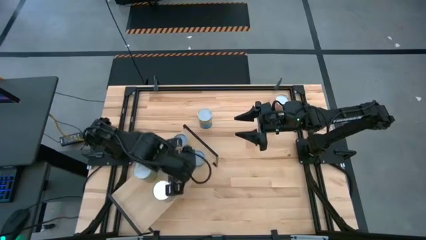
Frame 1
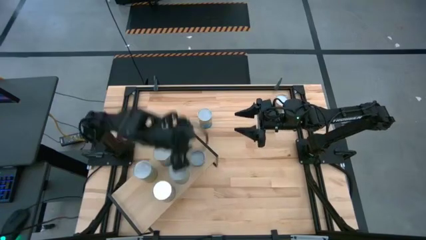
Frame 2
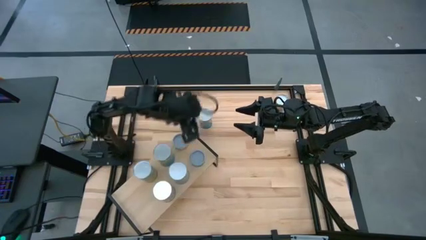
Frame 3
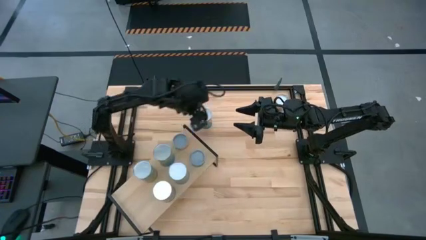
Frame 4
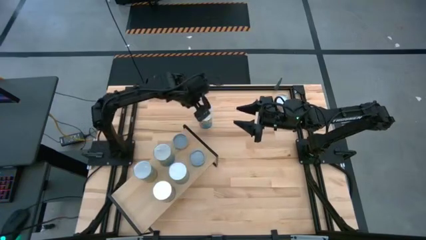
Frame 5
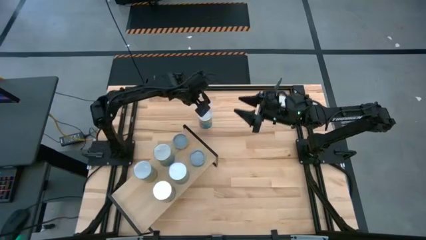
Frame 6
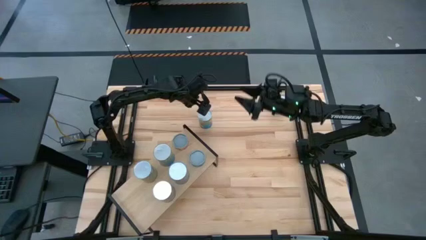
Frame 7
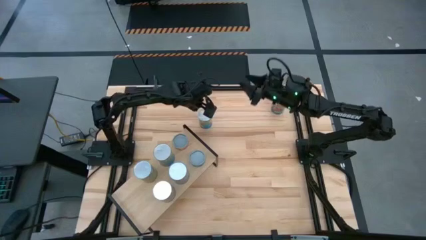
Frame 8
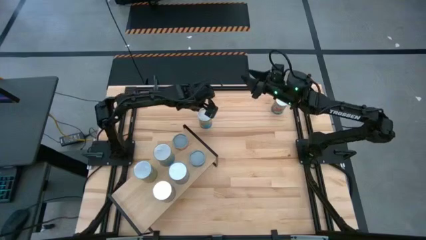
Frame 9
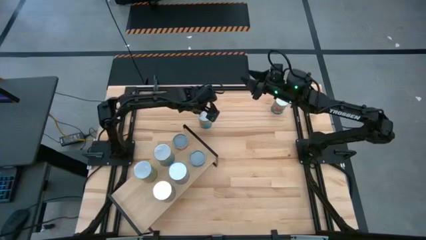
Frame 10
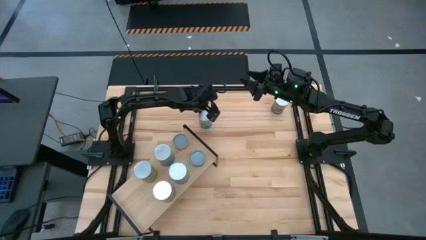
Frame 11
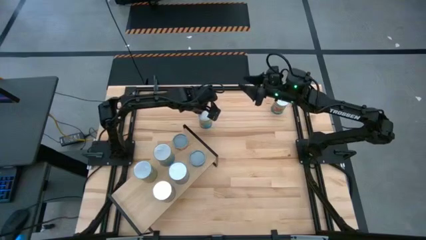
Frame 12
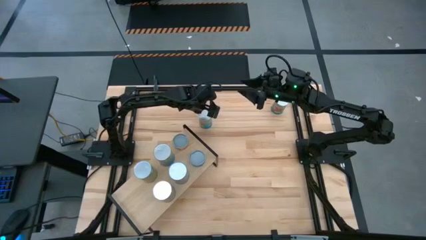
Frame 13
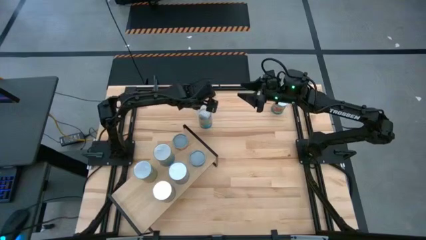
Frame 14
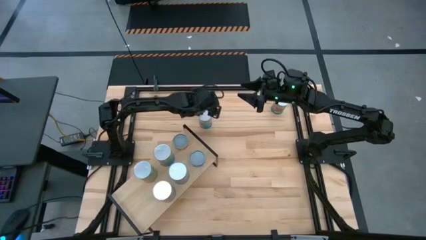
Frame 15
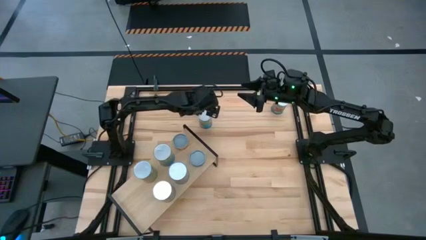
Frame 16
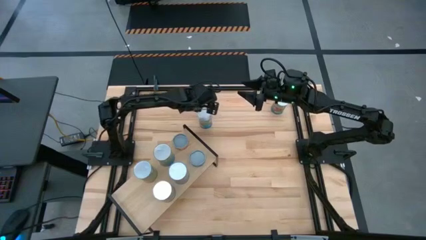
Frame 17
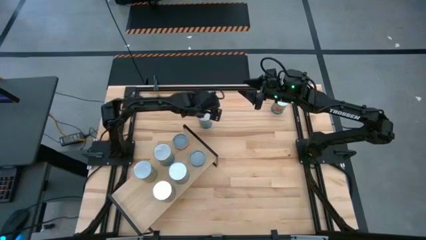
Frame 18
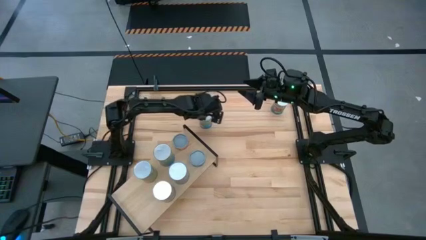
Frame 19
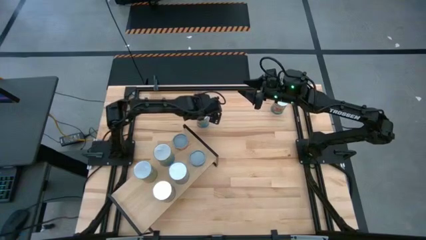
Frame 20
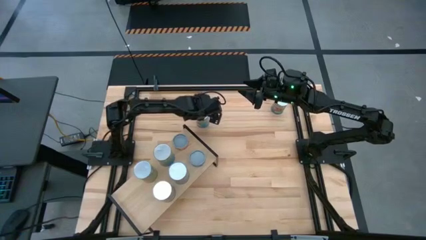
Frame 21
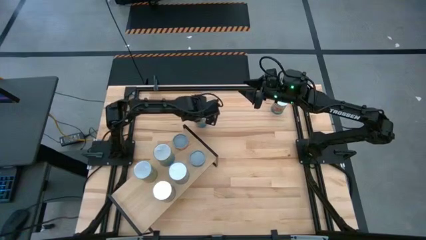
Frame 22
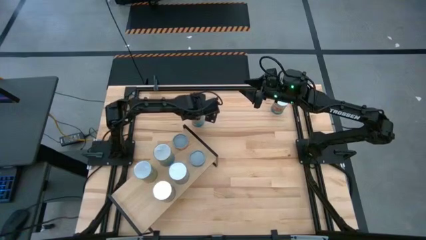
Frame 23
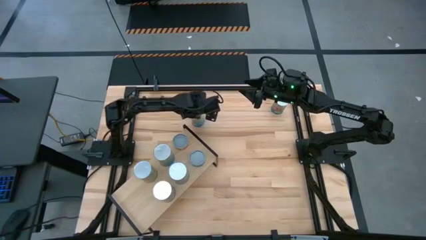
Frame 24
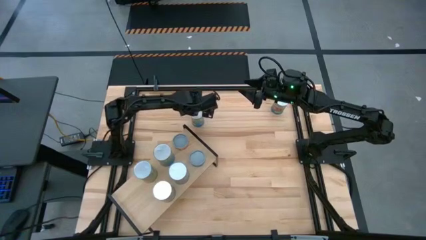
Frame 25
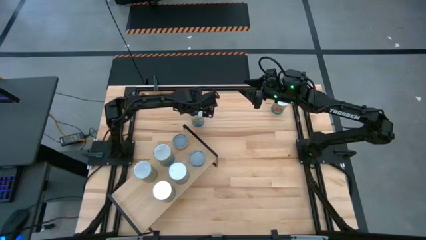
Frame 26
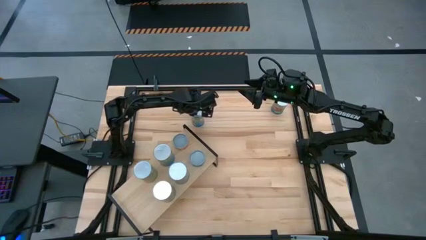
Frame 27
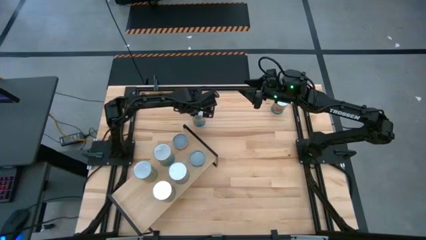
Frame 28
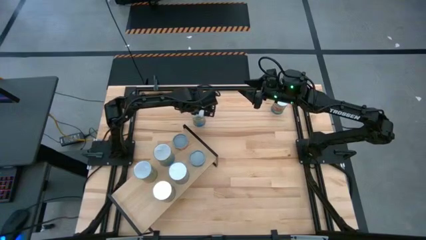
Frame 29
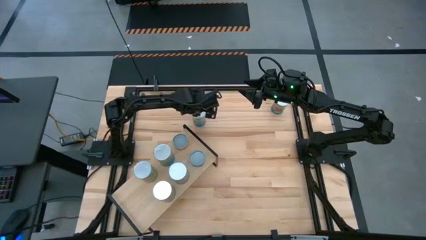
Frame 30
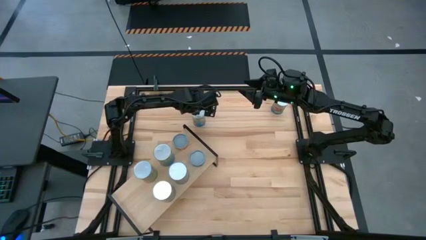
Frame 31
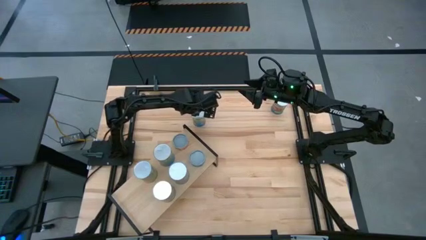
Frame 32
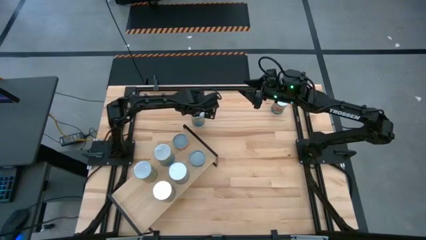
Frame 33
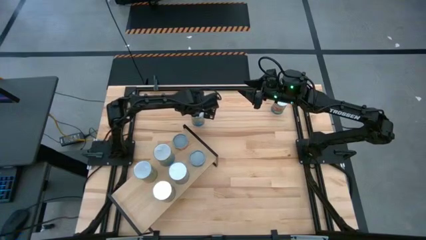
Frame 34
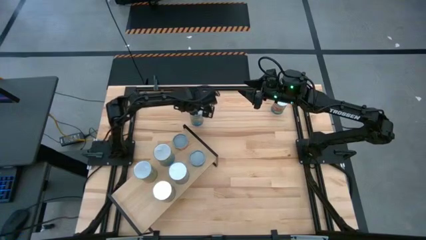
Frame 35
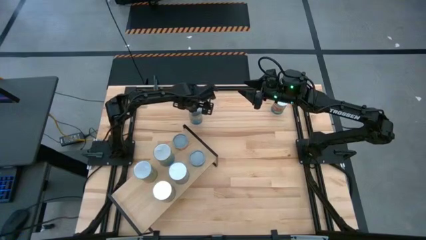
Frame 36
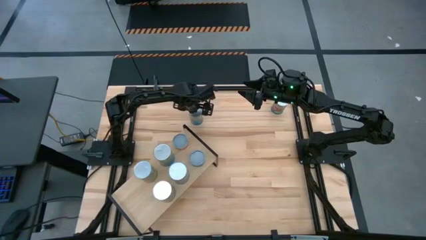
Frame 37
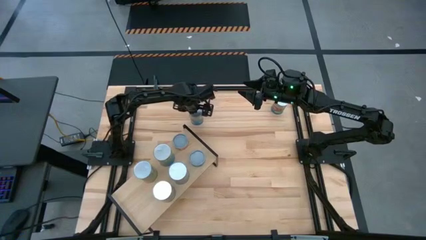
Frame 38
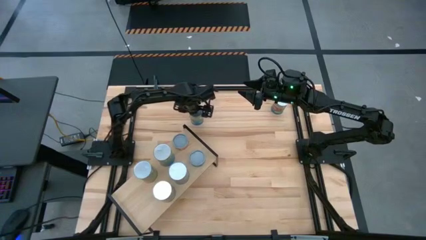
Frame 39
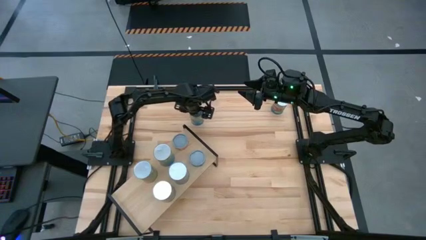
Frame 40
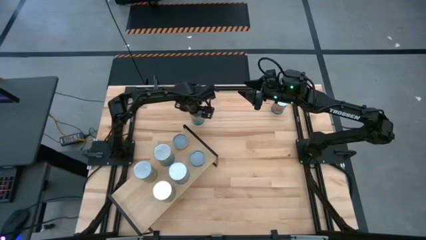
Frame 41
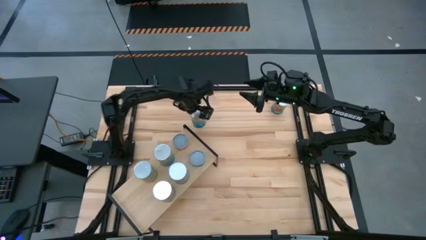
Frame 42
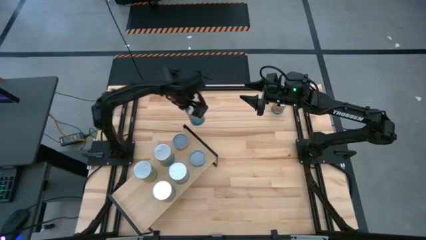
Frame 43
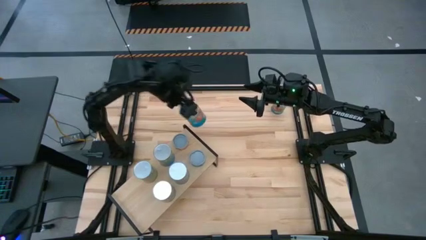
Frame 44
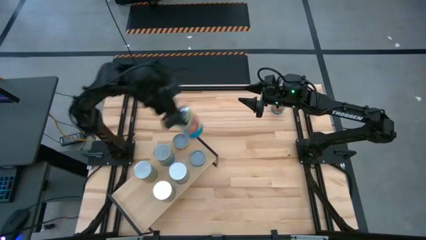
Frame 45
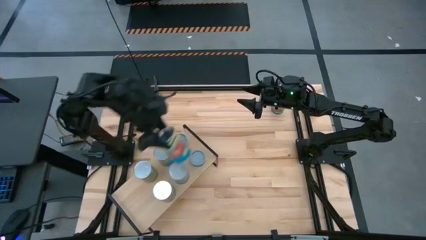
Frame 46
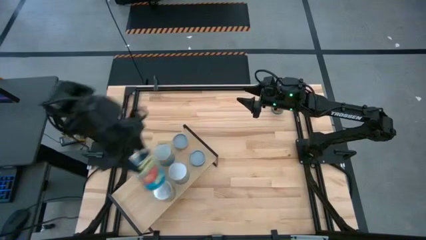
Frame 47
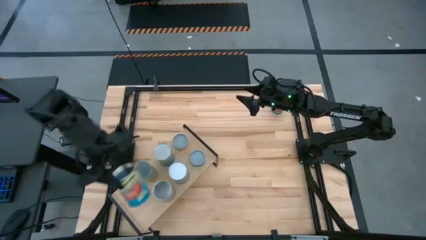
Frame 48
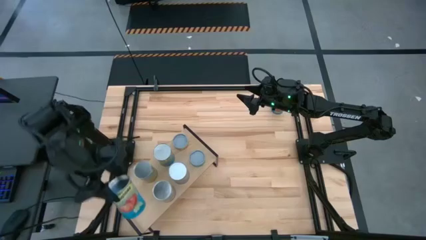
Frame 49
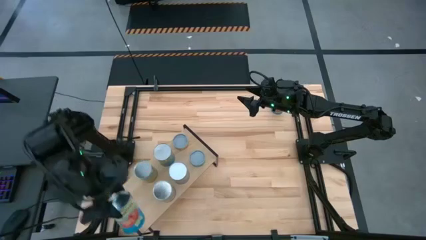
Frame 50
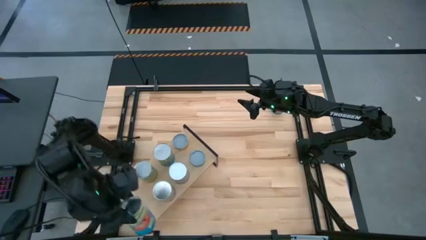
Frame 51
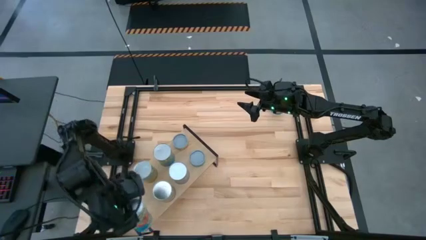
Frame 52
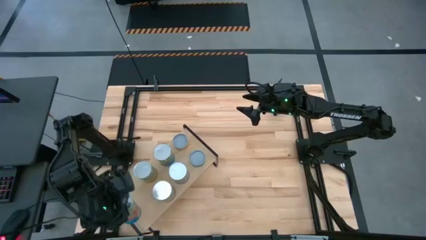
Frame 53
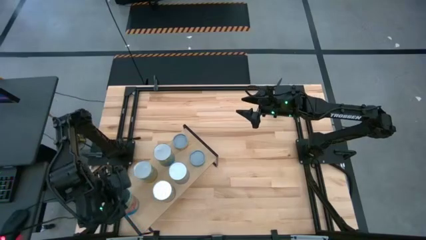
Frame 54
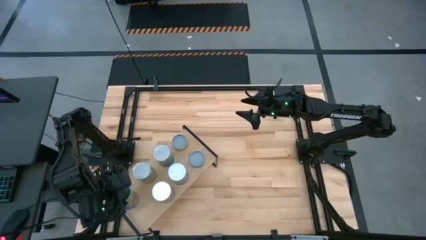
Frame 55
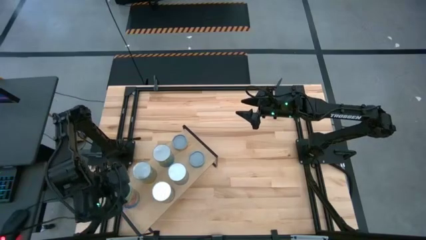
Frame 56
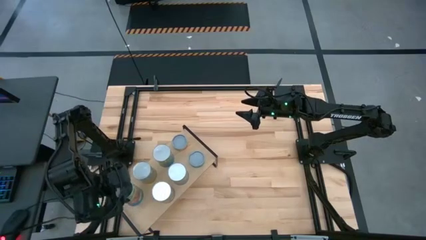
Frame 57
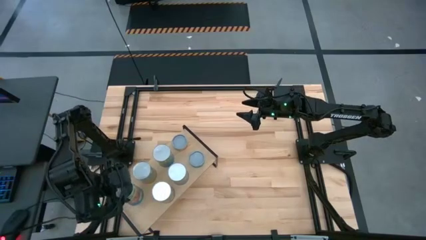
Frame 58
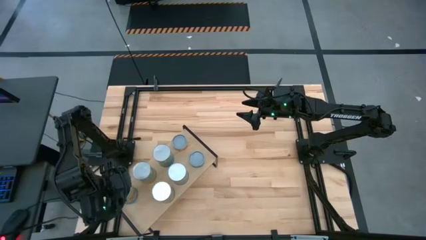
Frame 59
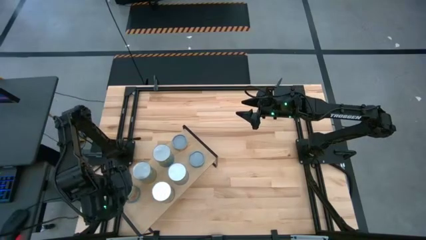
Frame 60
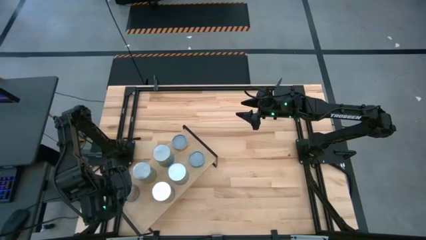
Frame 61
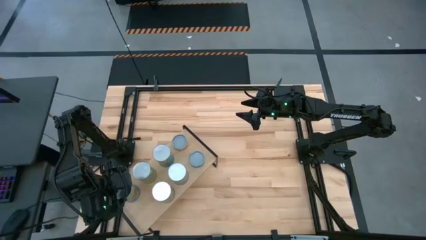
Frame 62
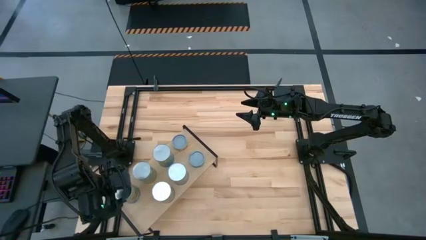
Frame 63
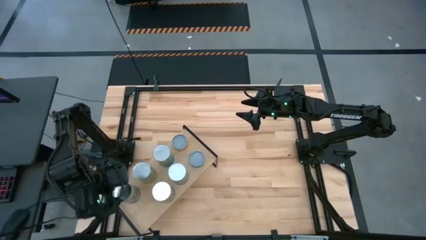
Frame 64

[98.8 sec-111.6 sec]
Task: Pick and place cans onto a shelf
Put the left canned tomatoes on the shelf
